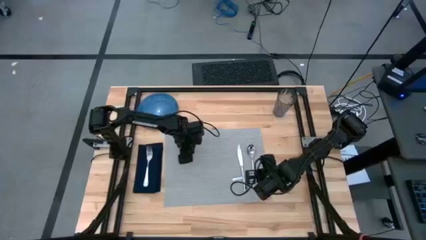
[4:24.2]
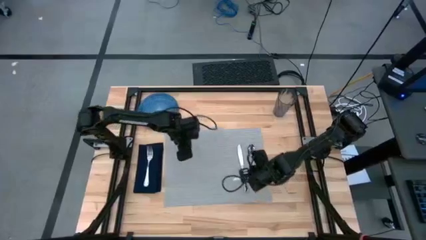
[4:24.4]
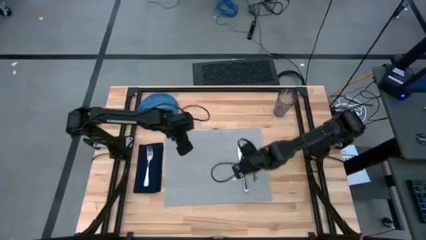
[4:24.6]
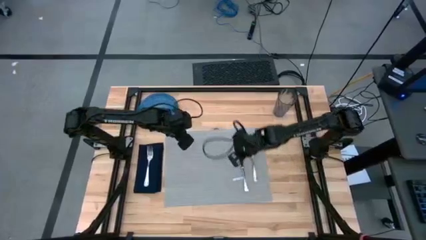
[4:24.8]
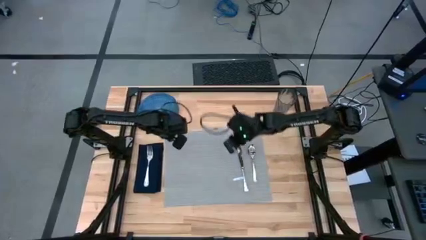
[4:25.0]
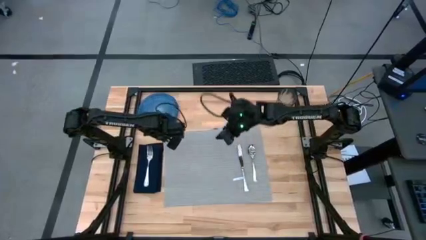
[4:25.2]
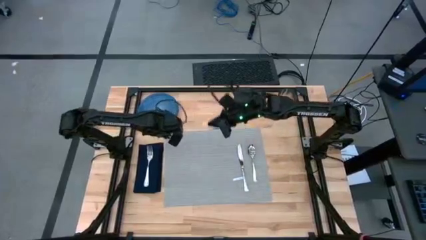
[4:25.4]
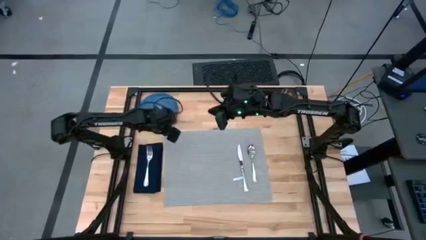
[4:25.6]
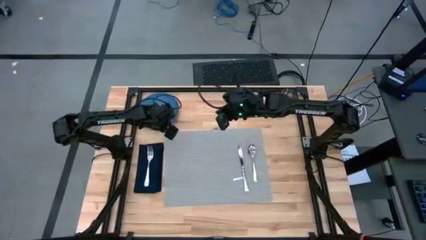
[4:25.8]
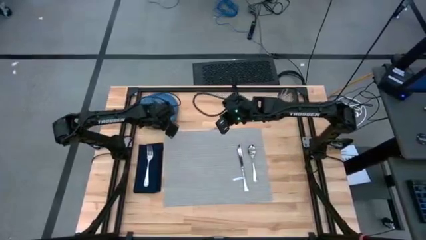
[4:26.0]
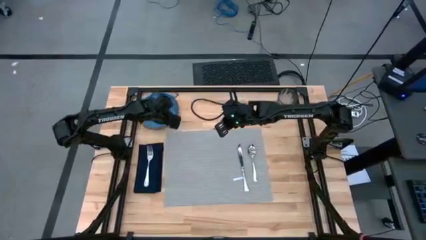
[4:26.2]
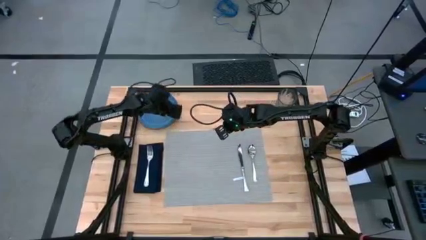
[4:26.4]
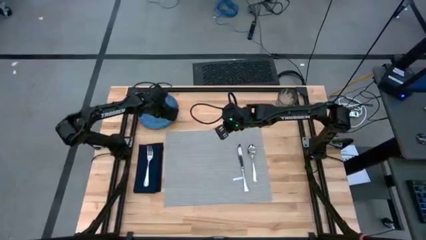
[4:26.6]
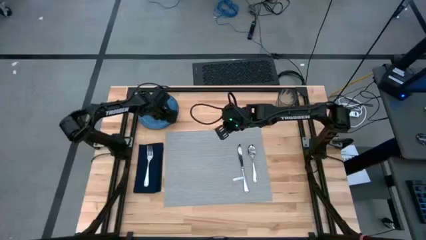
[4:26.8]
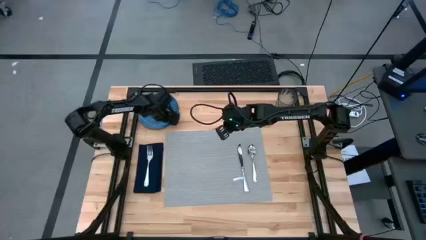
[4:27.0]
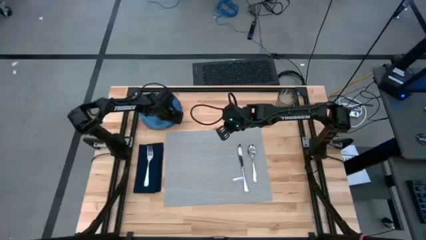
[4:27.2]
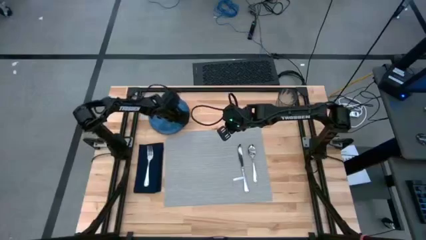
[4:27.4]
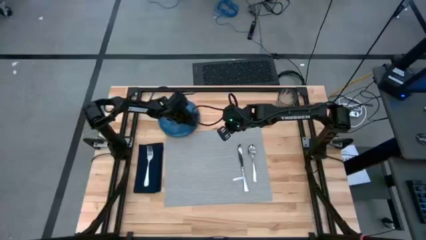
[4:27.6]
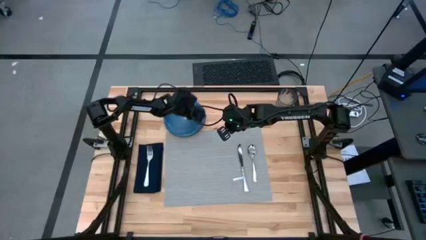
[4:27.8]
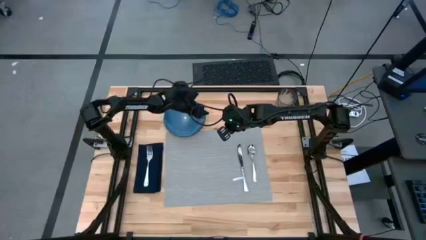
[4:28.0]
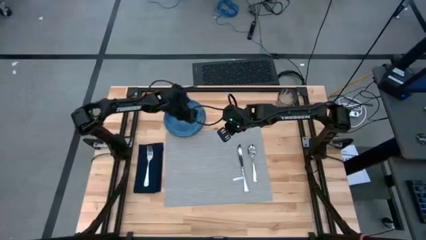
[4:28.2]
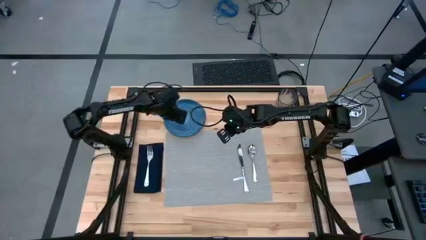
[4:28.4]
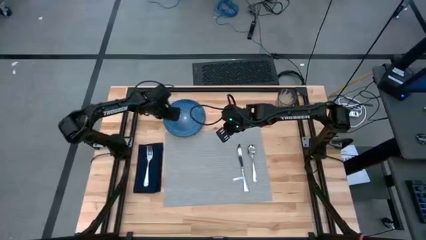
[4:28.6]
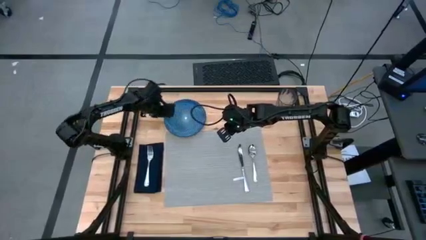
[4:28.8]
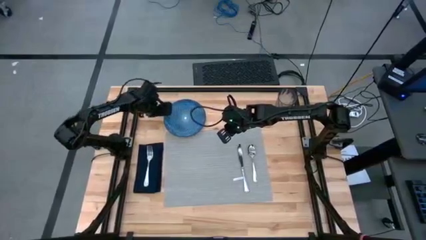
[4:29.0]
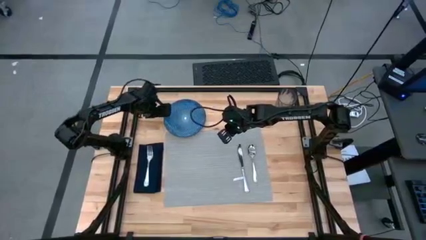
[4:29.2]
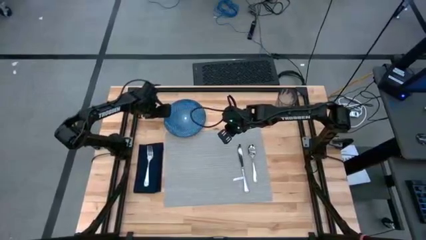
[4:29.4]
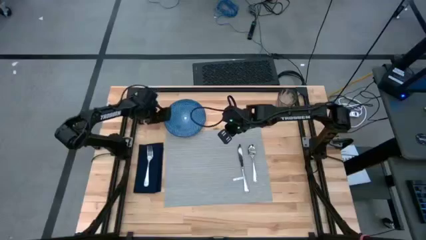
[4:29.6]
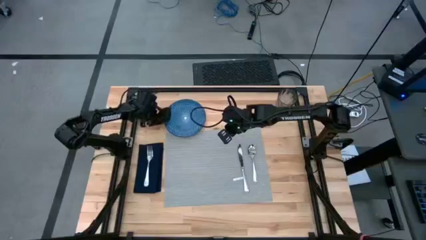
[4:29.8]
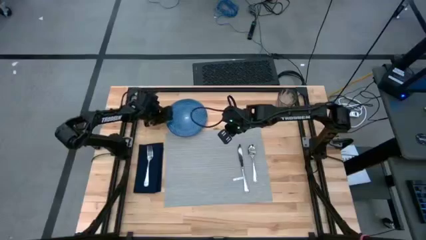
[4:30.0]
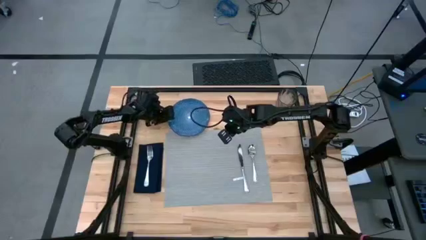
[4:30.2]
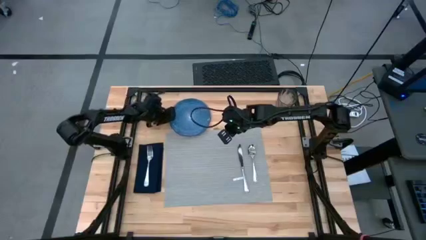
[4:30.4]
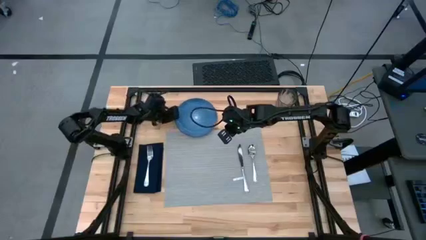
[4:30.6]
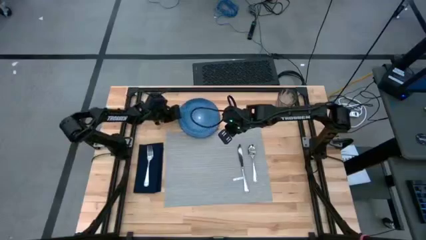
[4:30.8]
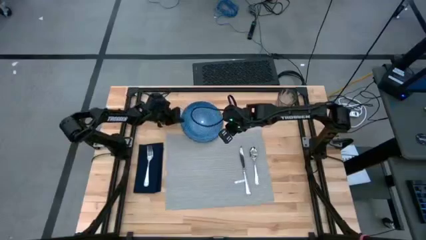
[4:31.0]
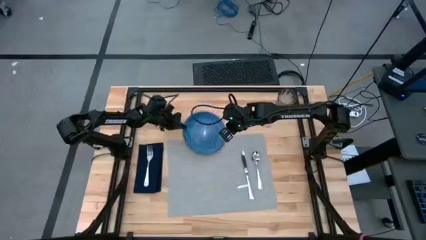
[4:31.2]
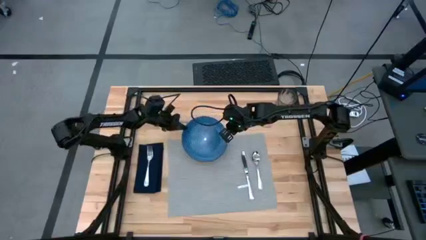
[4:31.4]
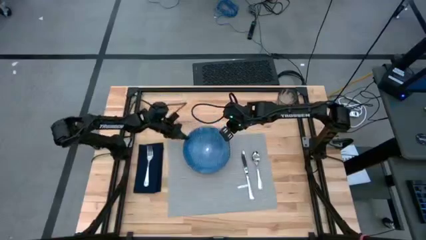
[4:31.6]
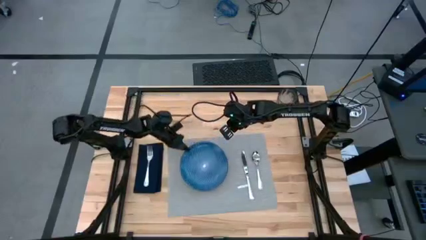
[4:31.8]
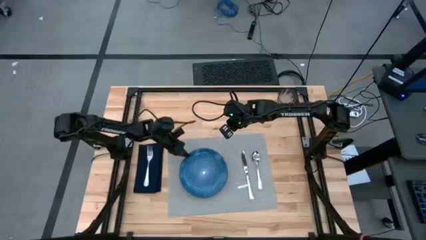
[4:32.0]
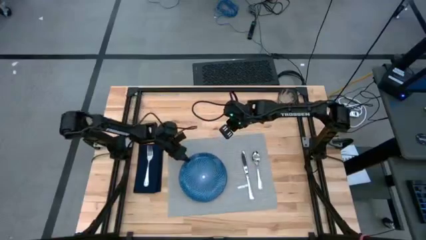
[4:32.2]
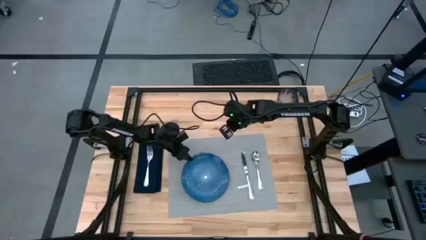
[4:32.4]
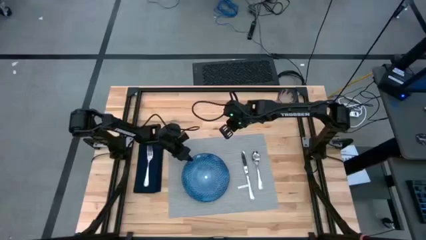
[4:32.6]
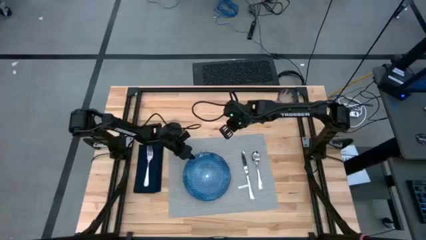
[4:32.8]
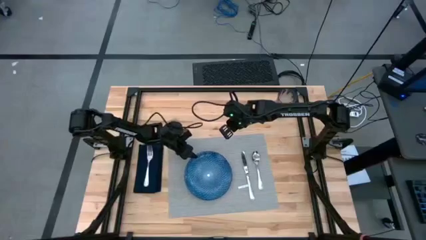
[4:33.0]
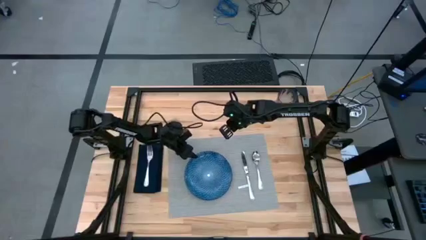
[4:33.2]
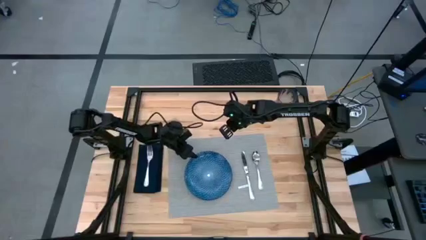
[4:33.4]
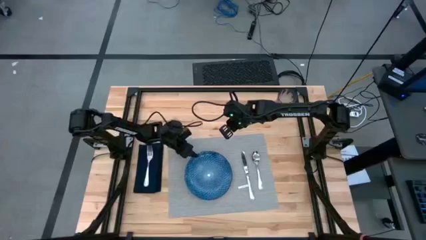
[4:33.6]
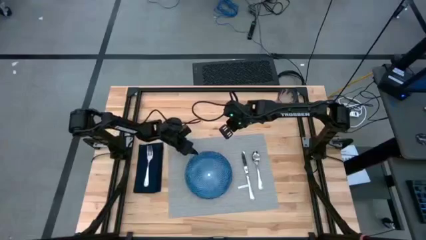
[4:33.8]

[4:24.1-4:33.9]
Task: Set table place
Put the blue plate on the center of the gray placemat

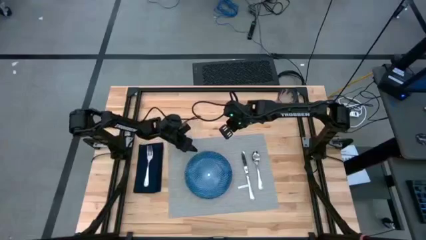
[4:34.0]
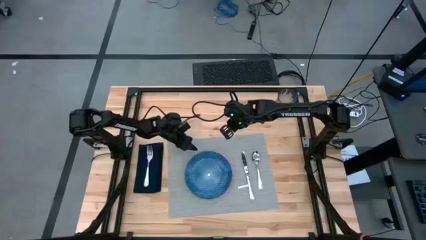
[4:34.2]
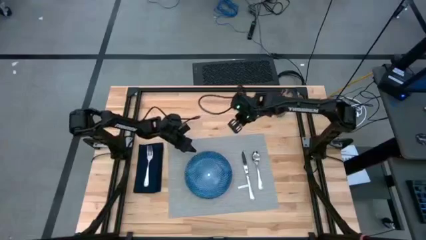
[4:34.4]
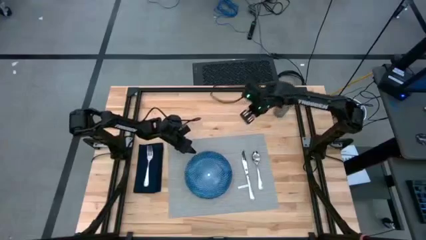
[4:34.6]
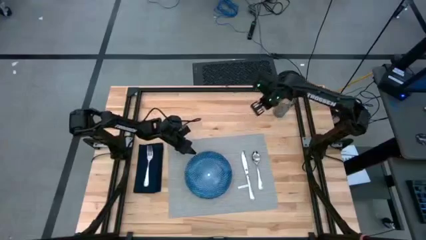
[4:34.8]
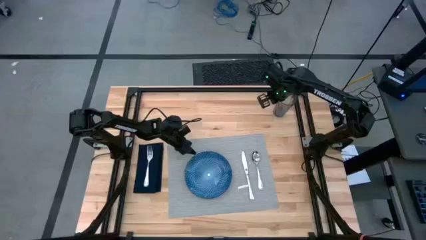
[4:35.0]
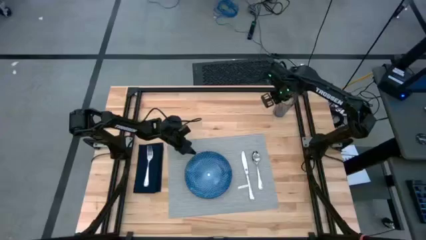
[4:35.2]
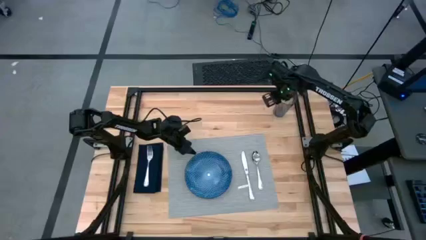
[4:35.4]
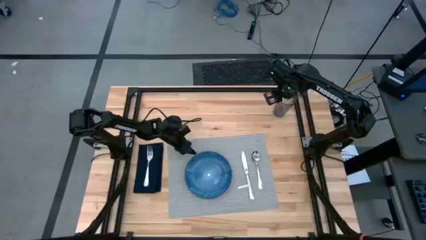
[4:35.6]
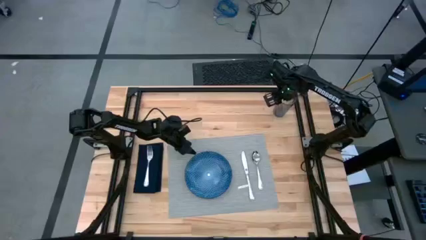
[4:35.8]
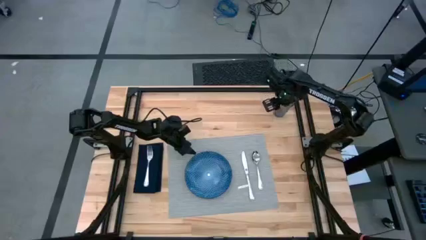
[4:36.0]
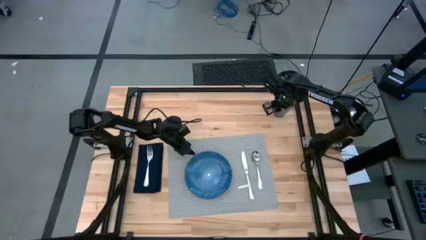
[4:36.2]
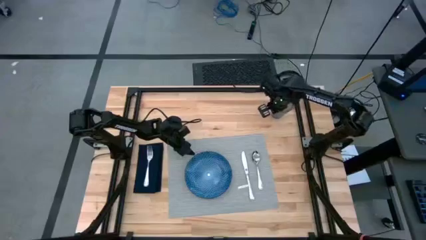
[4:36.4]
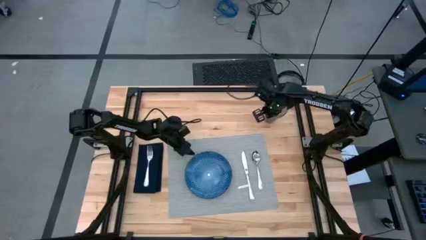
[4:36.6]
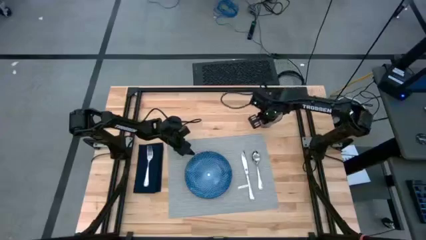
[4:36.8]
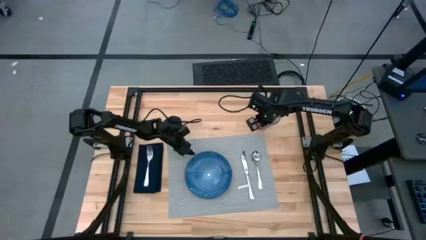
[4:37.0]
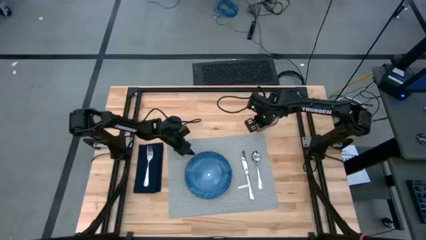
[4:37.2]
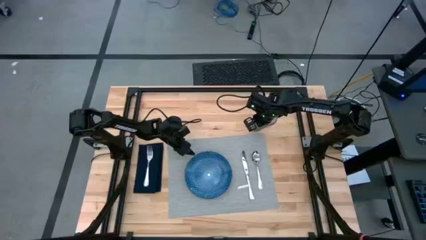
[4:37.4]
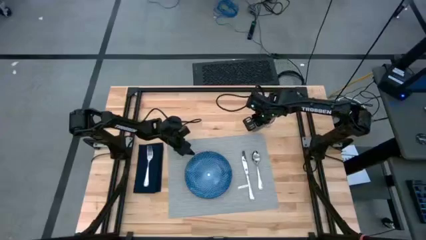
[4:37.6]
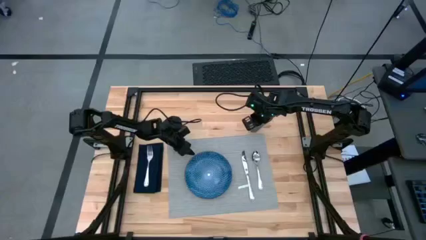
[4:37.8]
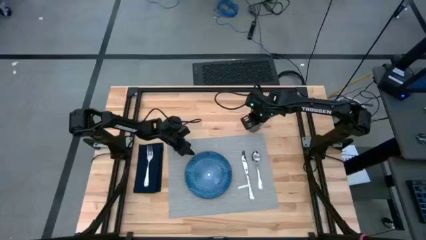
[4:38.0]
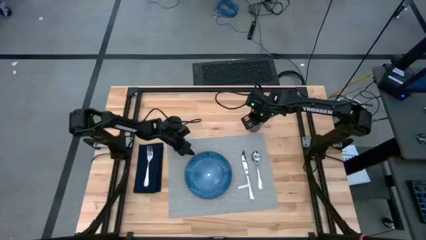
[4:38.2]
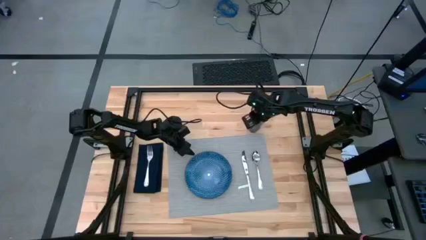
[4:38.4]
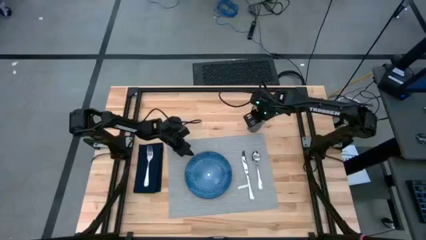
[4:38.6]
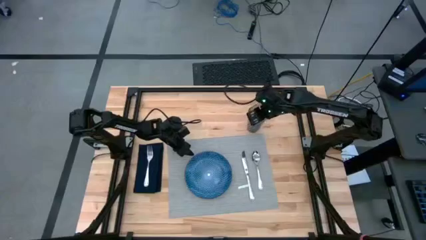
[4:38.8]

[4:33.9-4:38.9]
Move the blue transparent cup to the top right of the table above the gray placement

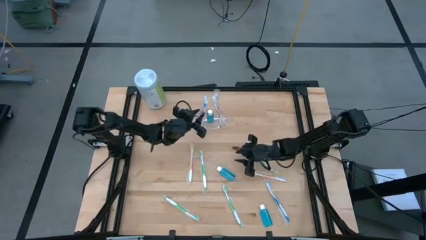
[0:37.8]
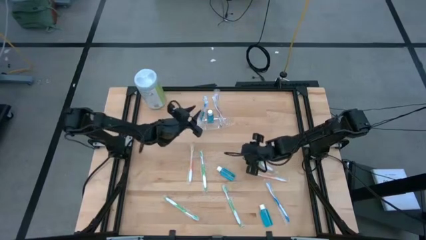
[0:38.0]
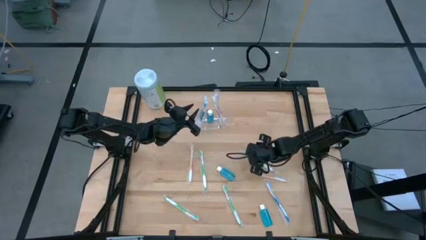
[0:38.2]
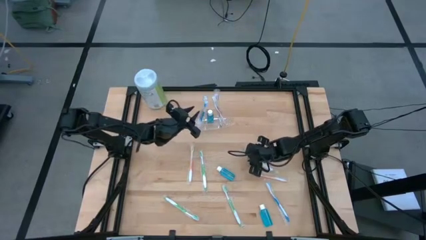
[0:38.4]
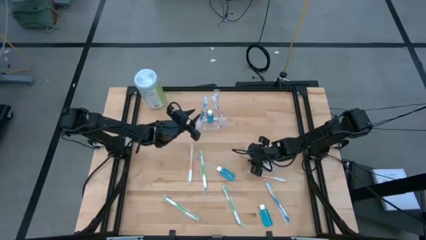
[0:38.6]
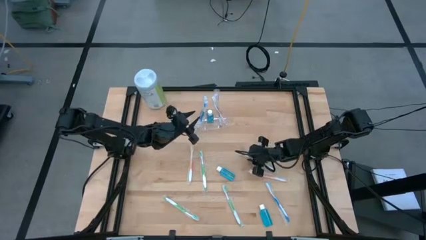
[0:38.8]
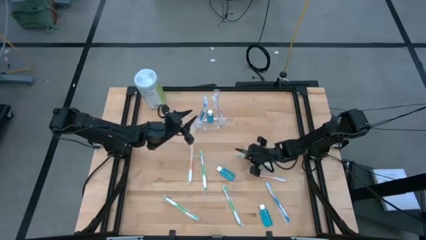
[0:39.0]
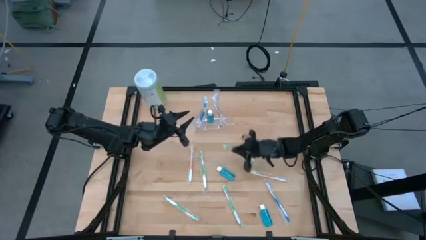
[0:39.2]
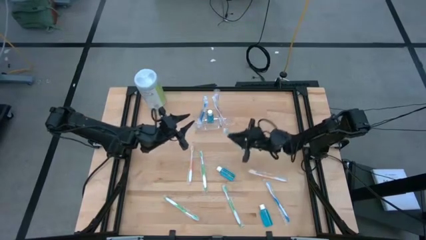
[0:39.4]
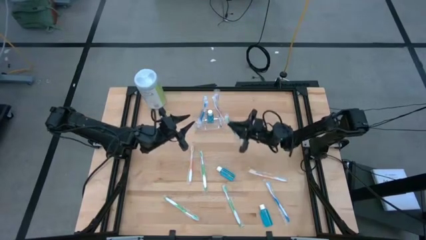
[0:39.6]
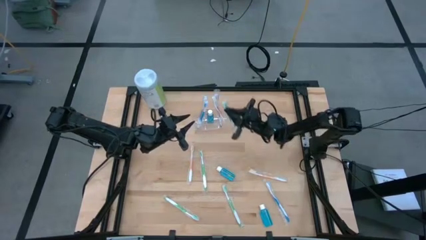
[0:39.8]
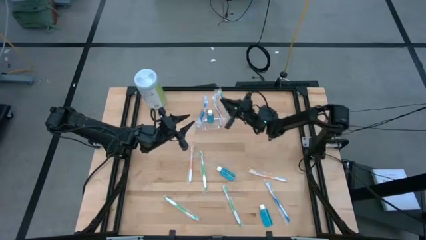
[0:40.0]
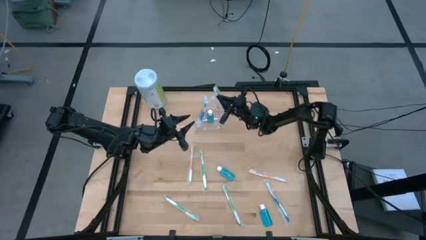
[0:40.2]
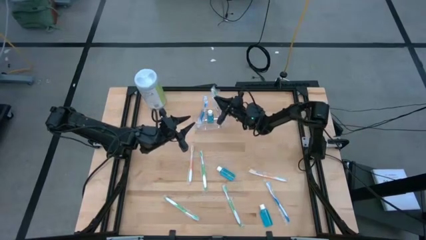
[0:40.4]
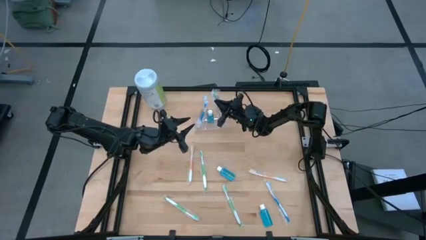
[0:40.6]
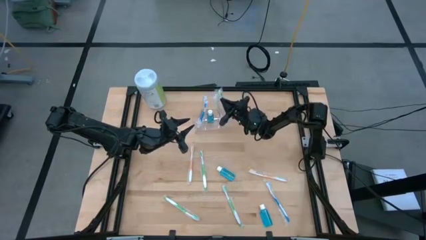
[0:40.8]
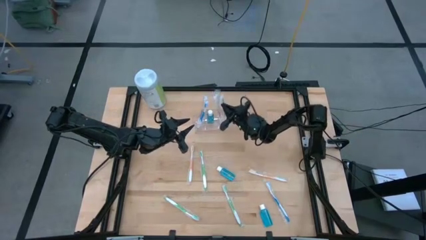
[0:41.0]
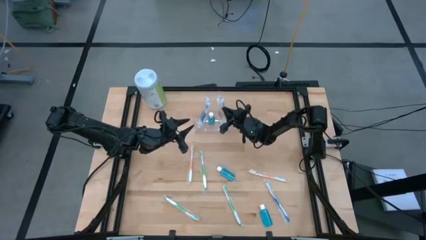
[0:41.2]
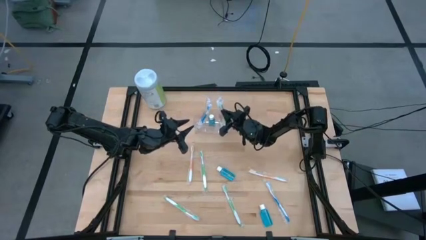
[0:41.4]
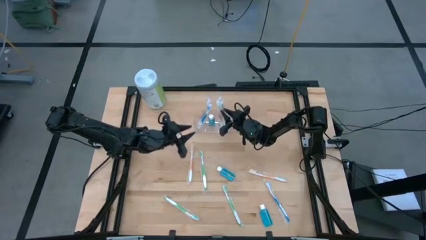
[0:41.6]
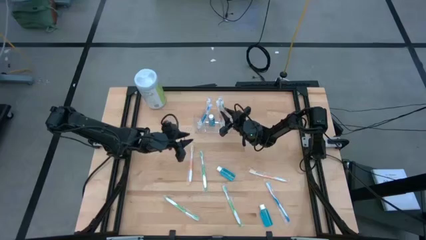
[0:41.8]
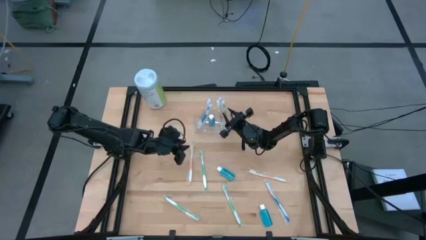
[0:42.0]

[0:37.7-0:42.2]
Task: Pick & Place toothbrushing station
Put the green toothbrush to the right of the transparent organizer
